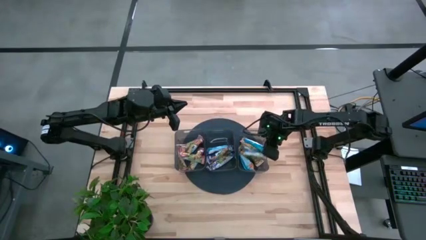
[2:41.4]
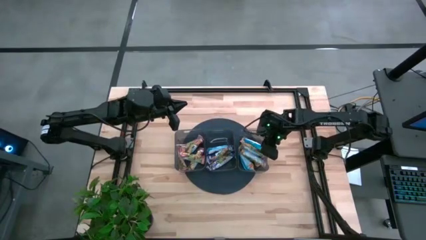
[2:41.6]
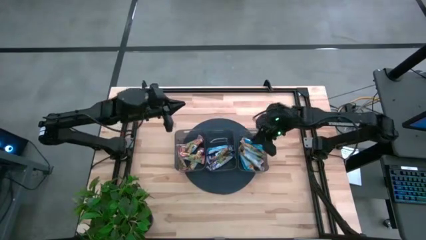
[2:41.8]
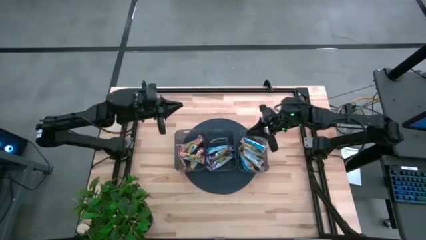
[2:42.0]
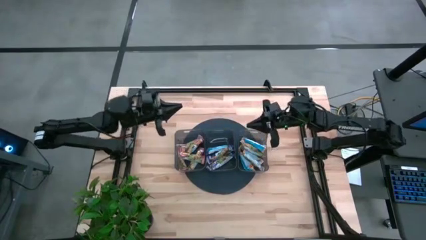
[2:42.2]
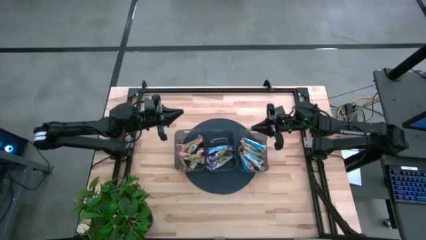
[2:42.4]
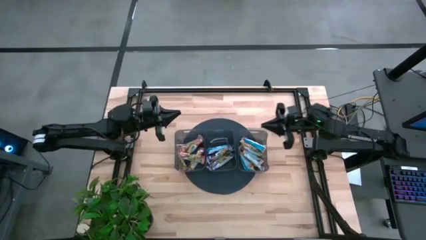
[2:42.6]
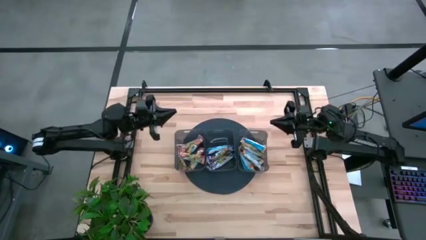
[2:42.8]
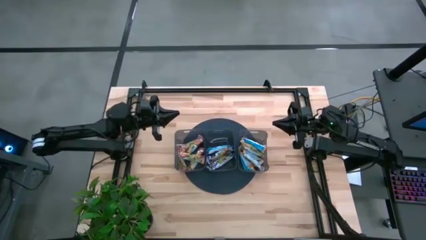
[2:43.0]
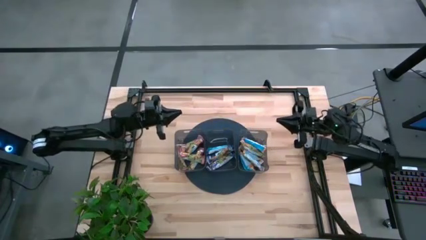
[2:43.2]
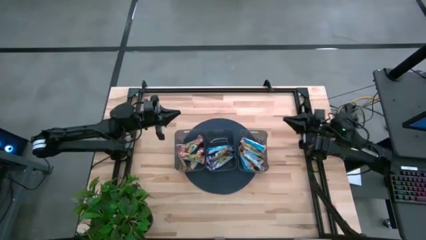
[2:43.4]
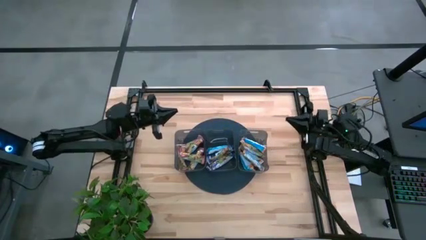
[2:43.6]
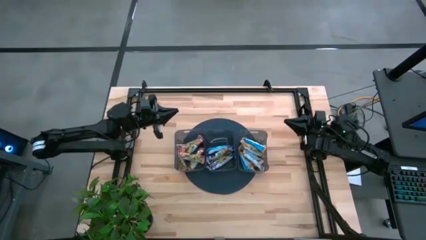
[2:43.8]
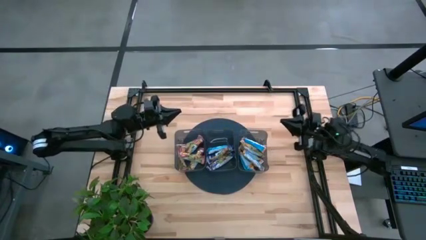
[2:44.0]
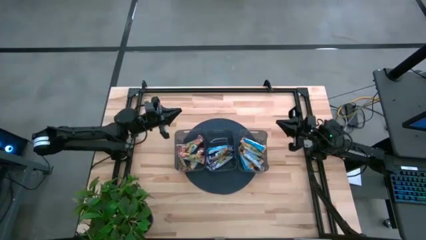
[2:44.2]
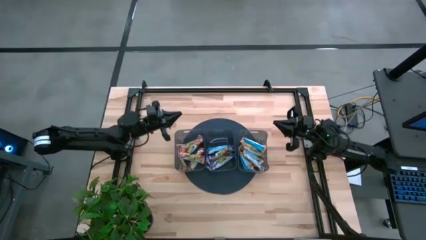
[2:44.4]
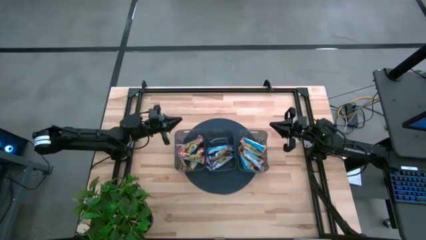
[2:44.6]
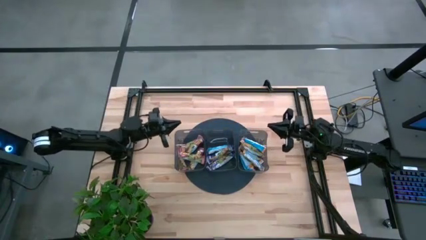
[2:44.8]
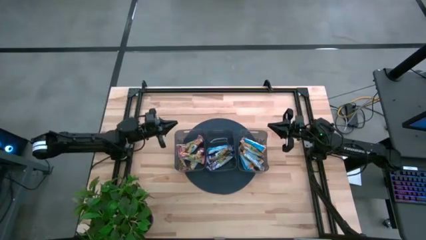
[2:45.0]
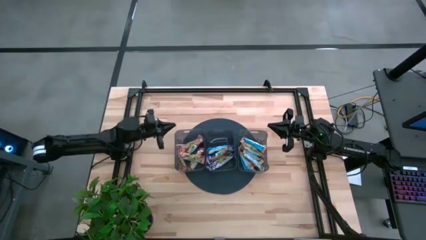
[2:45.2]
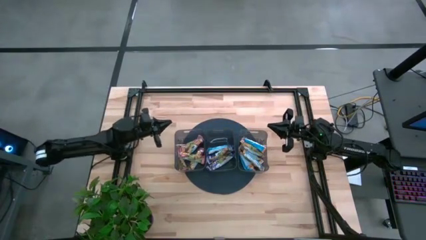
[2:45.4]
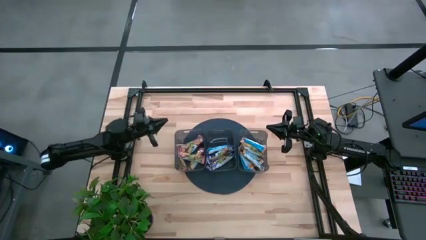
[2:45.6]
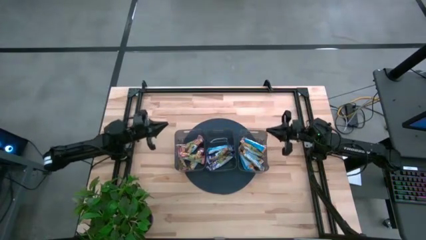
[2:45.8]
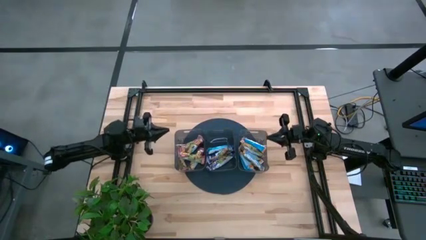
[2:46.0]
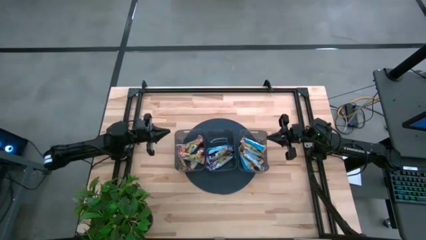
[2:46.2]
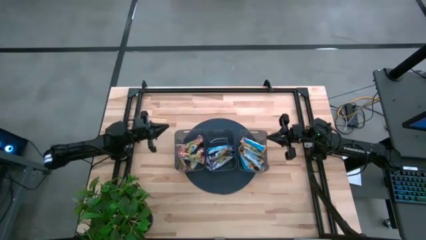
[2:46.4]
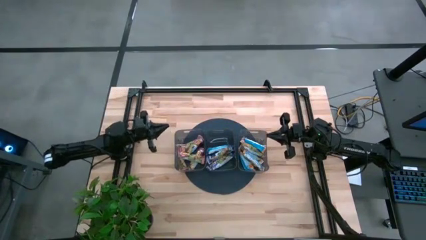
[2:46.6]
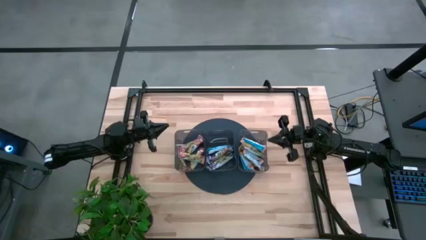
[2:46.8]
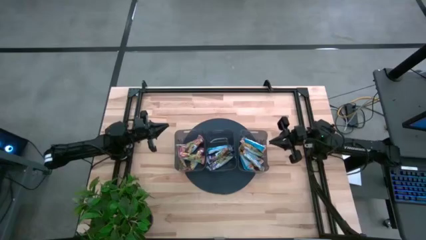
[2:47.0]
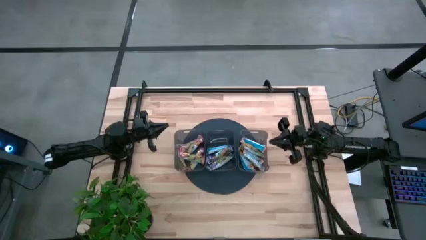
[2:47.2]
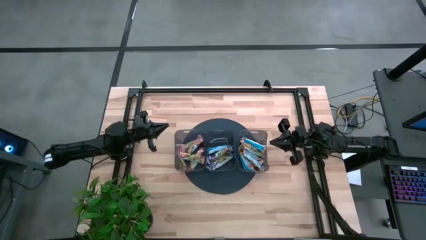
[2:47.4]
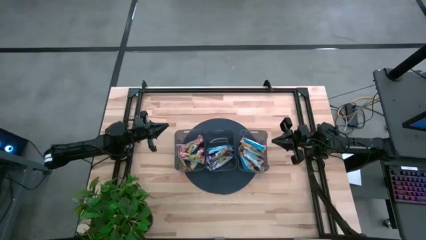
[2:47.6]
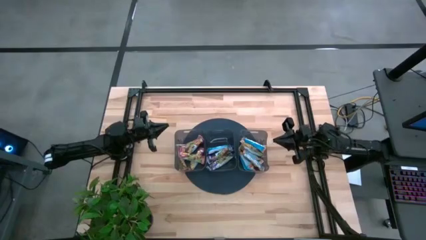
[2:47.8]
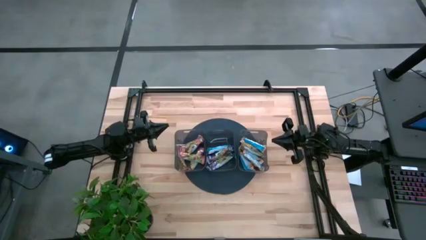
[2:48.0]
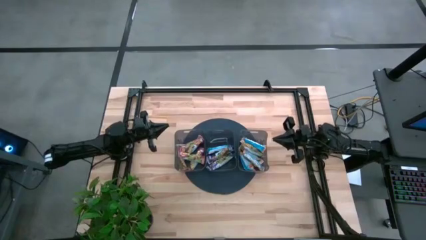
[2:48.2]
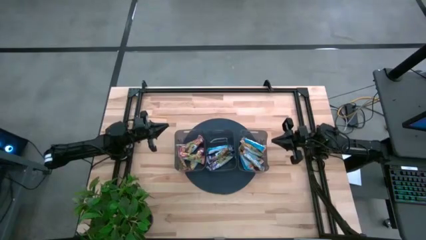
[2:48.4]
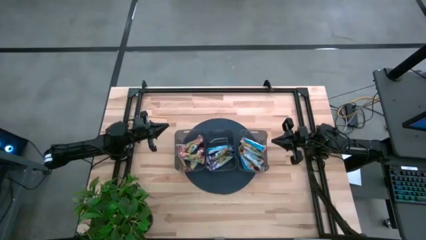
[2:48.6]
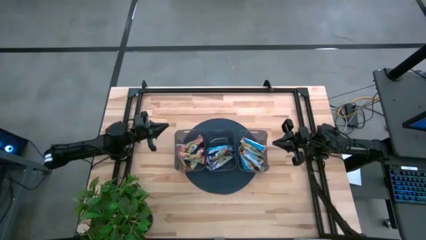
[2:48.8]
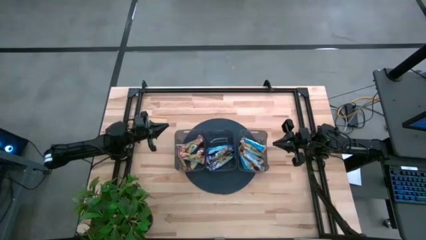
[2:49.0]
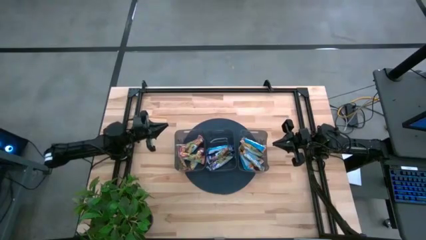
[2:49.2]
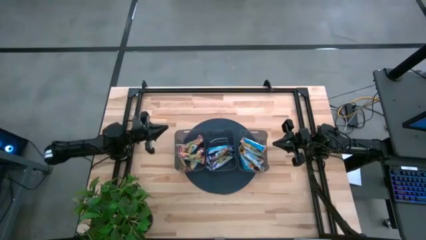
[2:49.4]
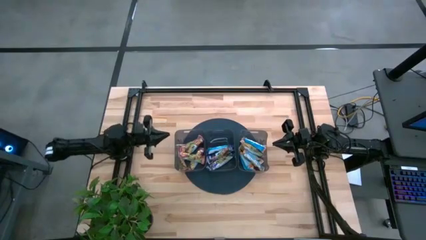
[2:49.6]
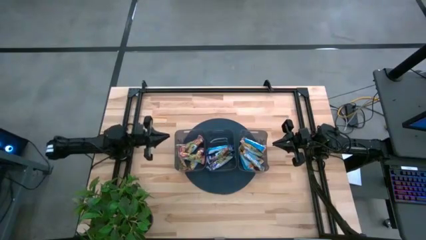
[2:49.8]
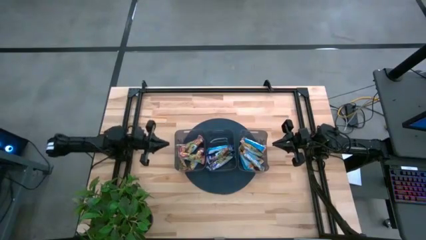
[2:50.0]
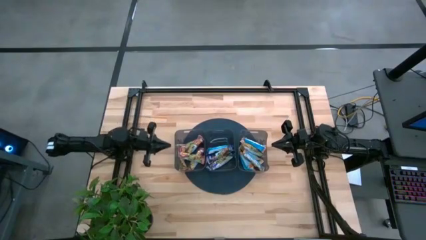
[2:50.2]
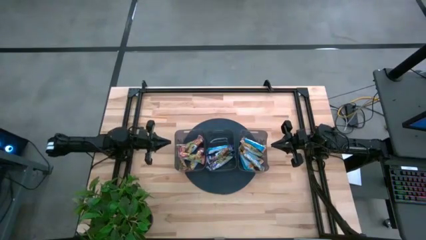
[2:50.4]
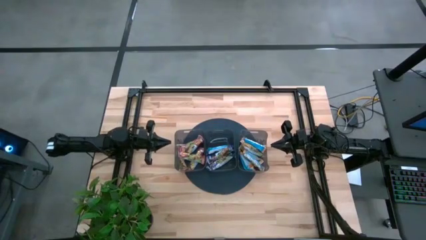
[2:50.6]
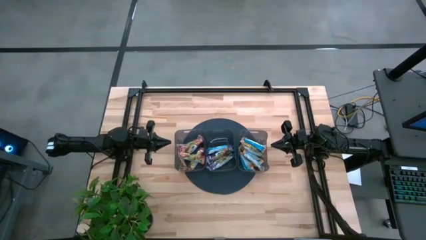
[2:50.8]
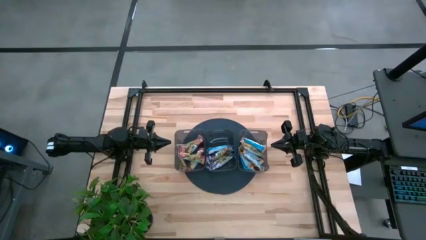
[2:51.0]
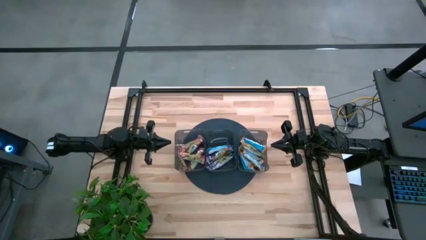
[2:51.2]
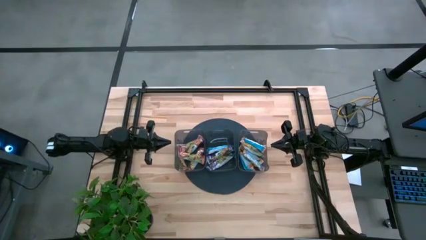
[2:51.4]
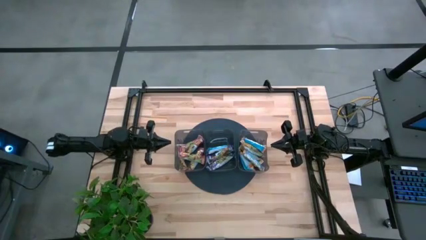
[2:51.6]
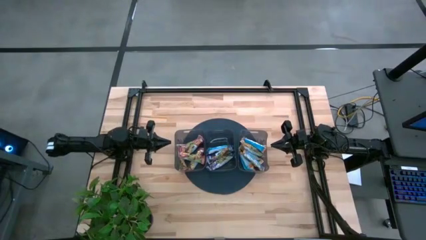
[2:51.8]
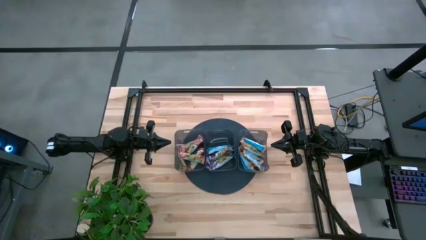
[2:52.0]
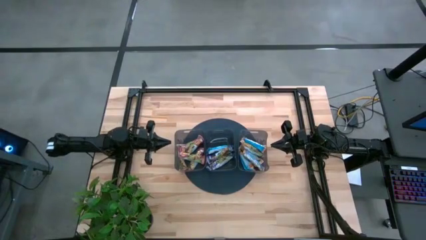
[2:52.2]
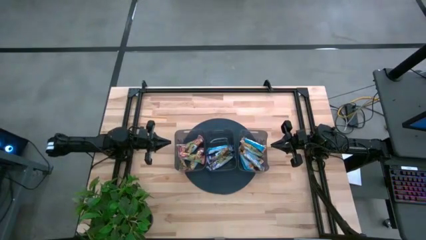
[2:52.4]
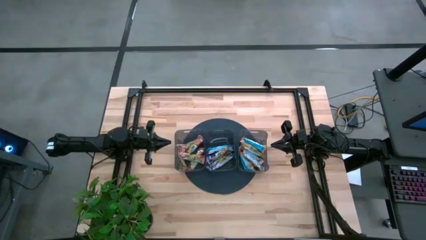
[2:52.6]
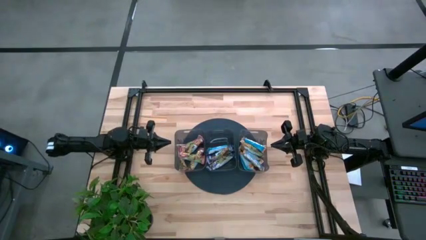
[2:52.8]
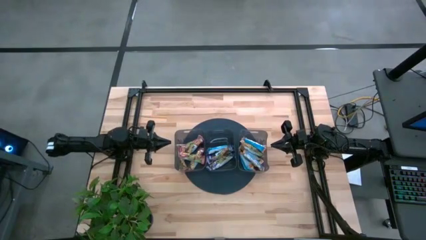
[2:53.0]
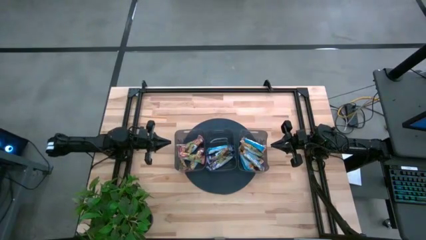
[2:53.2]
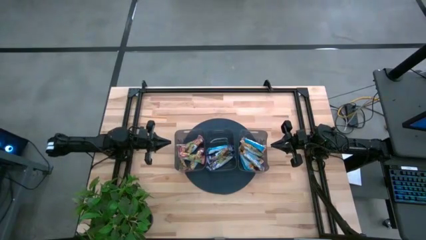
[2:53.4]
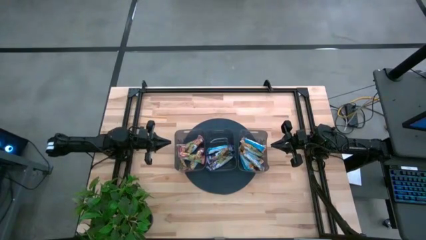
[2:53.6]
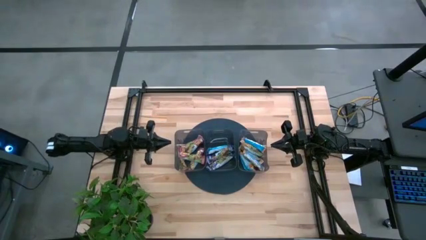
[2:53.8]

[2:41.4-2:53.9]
Task: Pick and place Granola Bars by type
Return to Home Position
